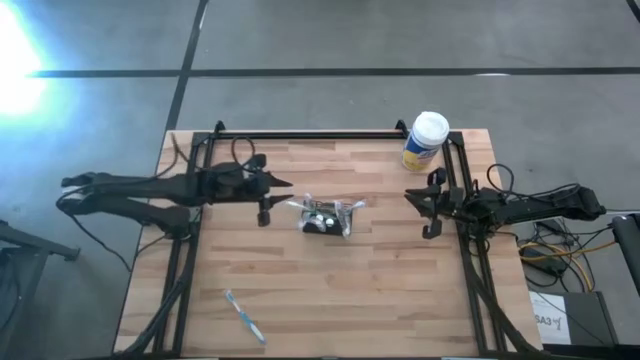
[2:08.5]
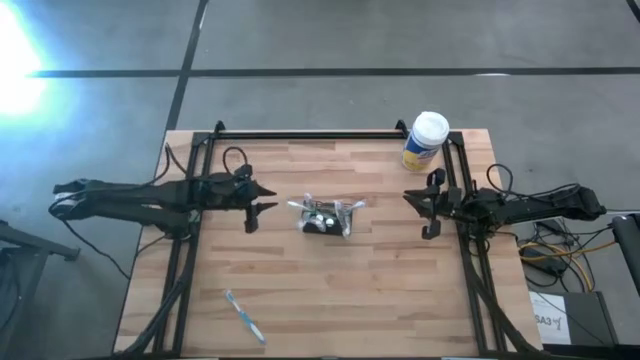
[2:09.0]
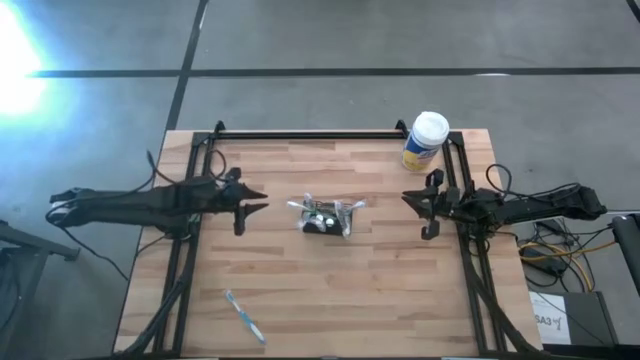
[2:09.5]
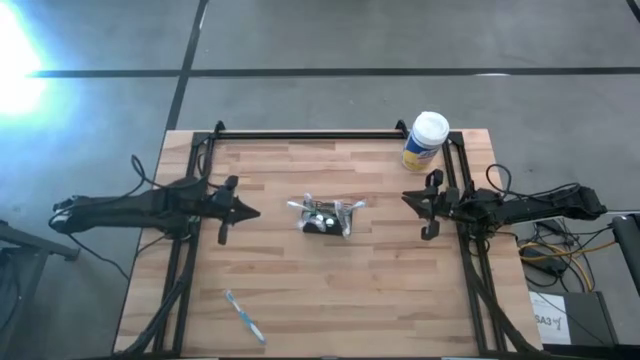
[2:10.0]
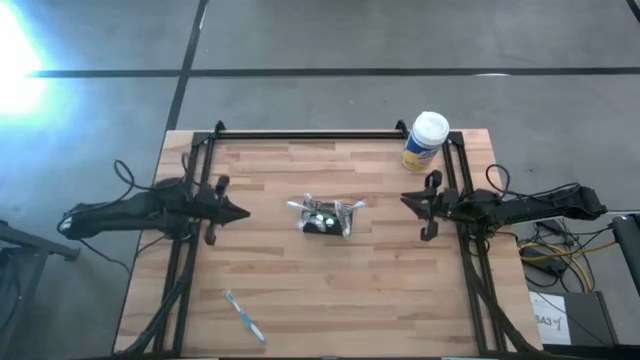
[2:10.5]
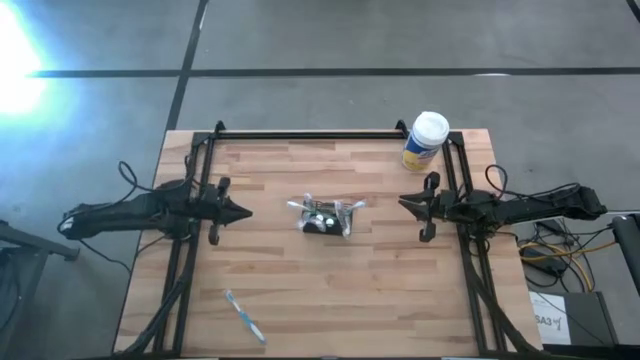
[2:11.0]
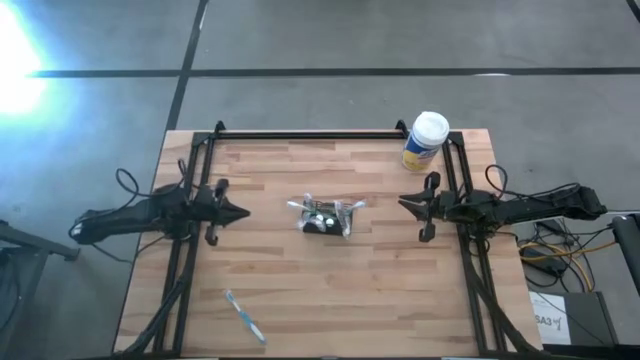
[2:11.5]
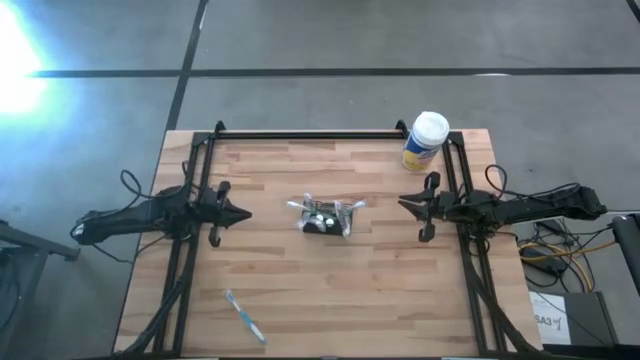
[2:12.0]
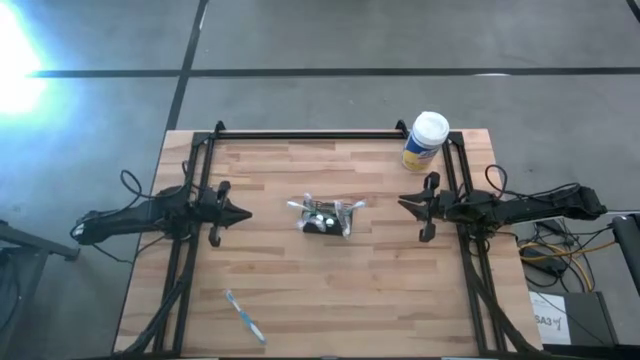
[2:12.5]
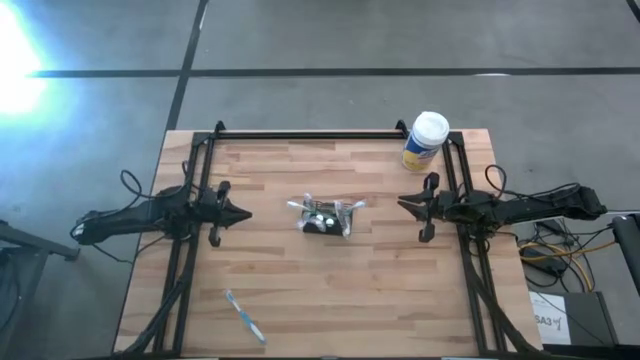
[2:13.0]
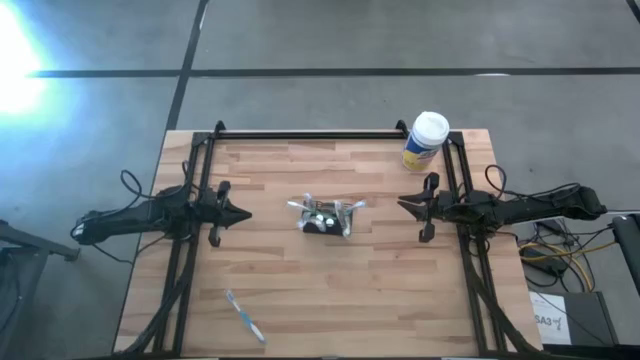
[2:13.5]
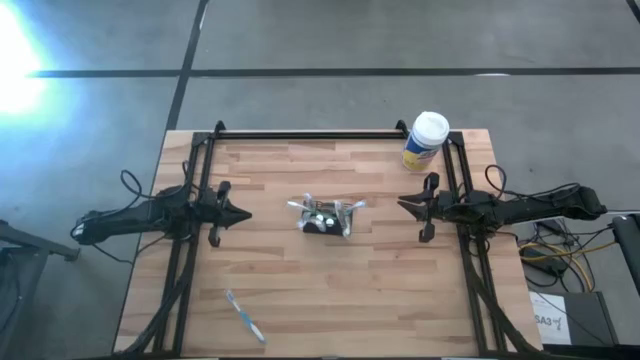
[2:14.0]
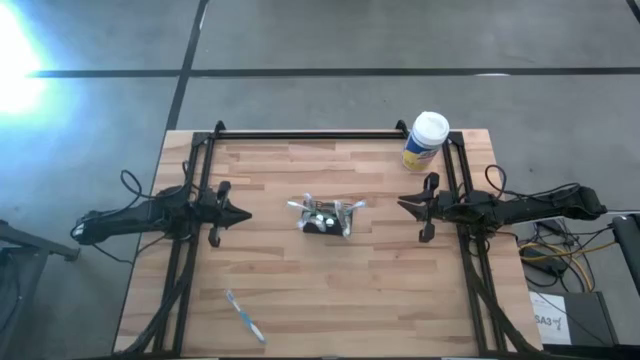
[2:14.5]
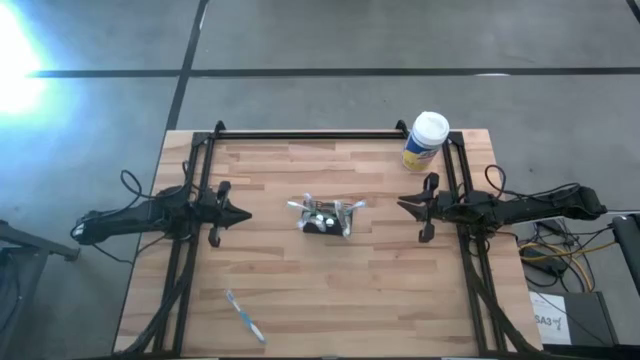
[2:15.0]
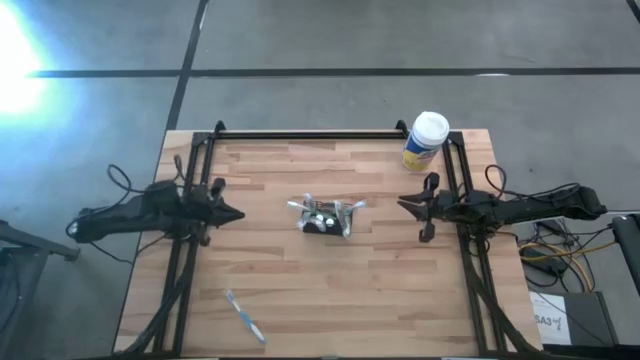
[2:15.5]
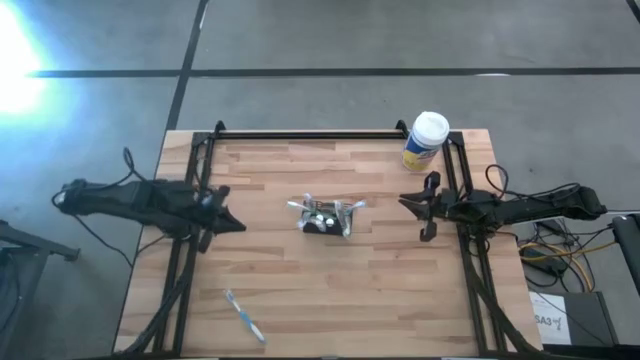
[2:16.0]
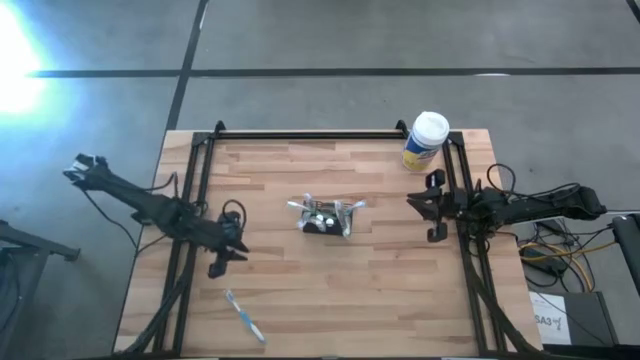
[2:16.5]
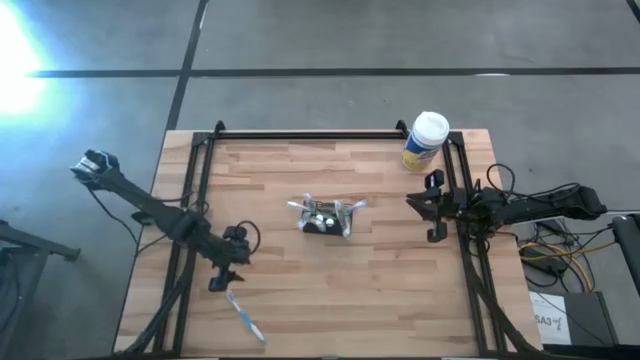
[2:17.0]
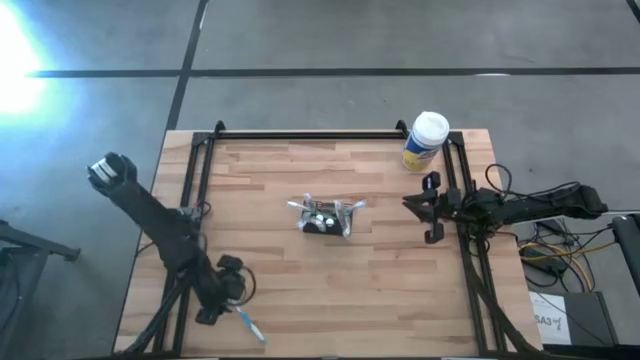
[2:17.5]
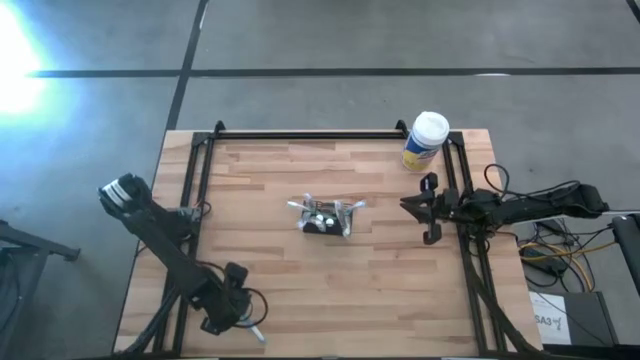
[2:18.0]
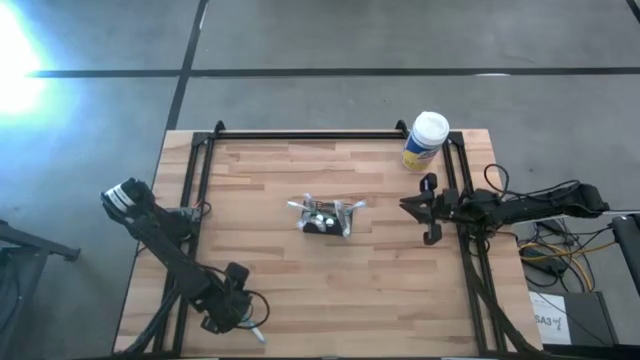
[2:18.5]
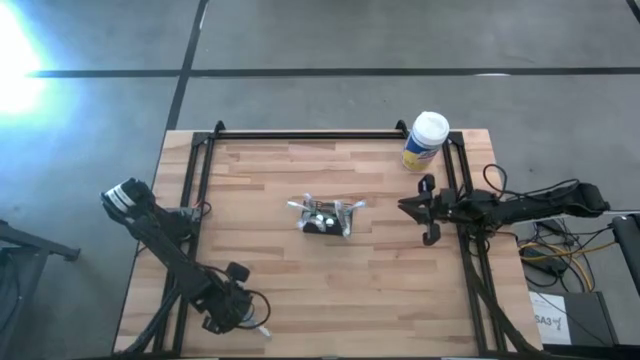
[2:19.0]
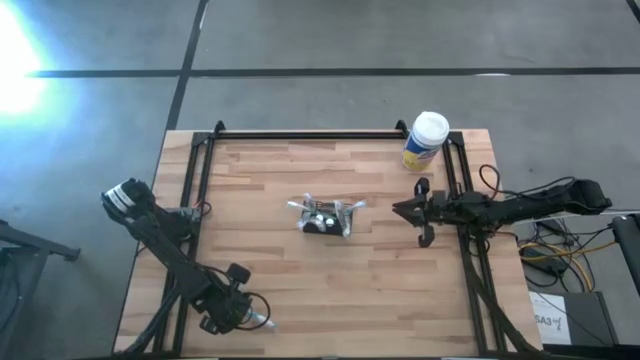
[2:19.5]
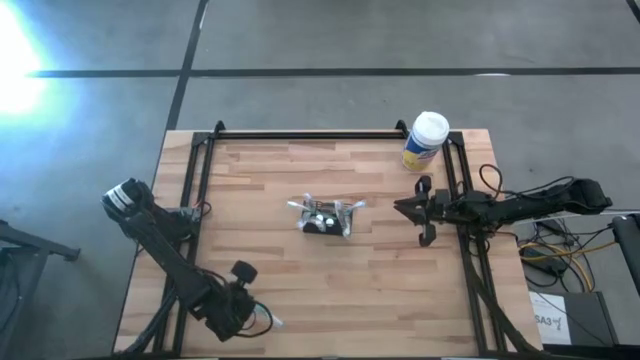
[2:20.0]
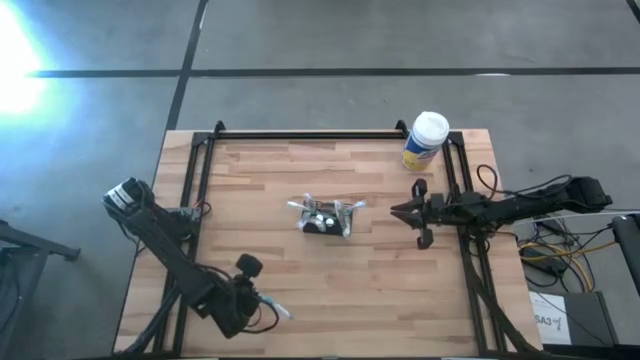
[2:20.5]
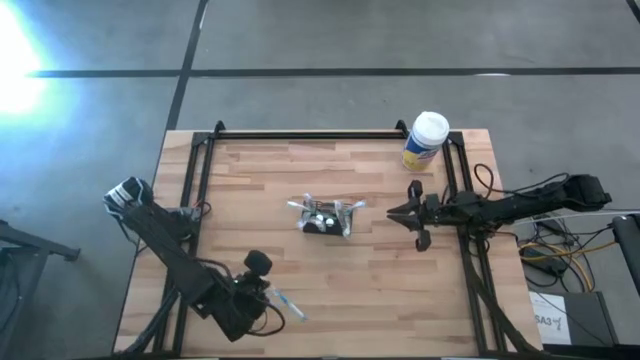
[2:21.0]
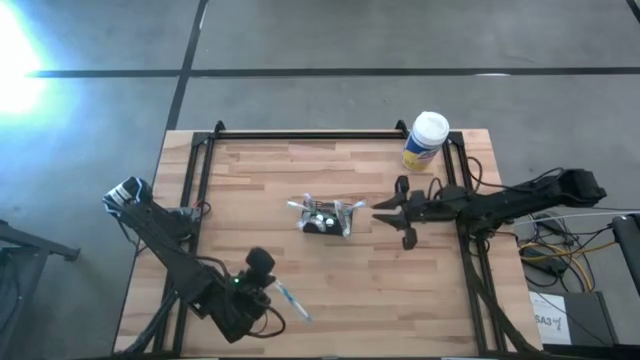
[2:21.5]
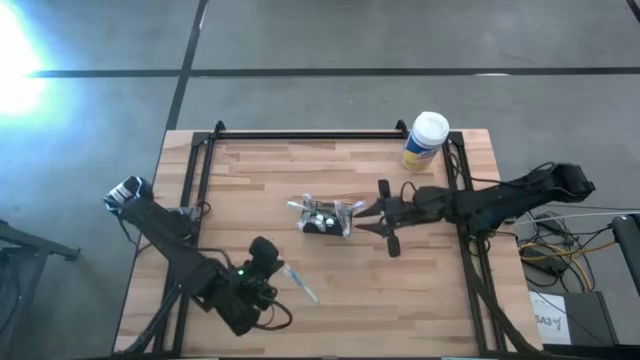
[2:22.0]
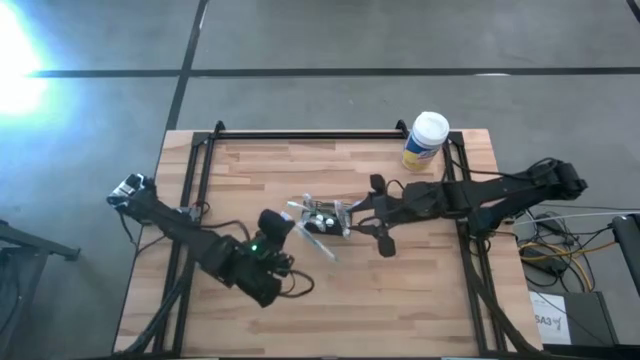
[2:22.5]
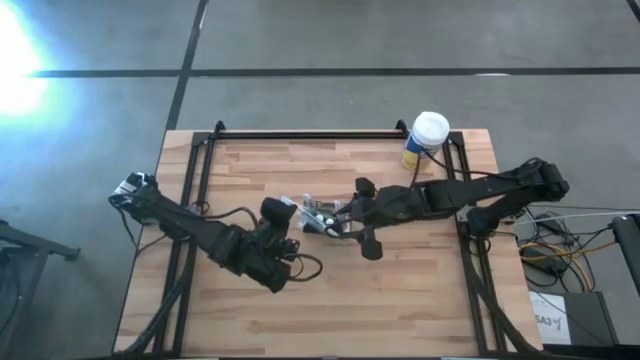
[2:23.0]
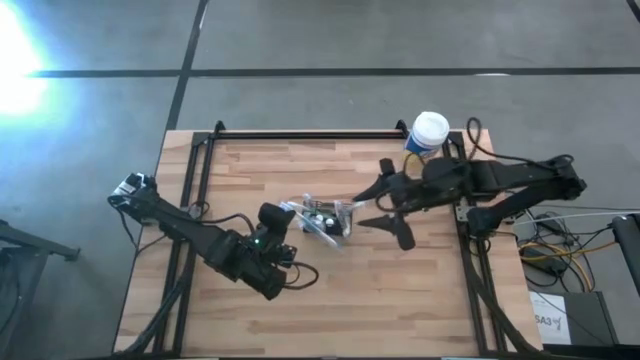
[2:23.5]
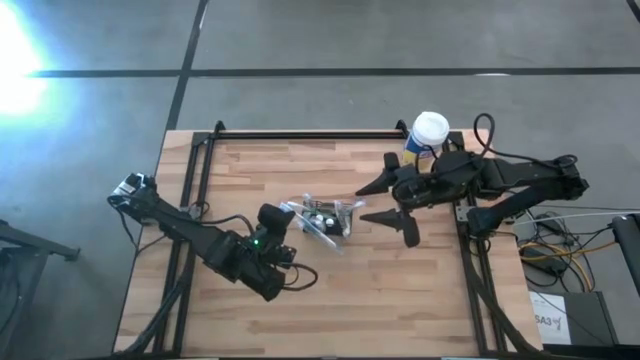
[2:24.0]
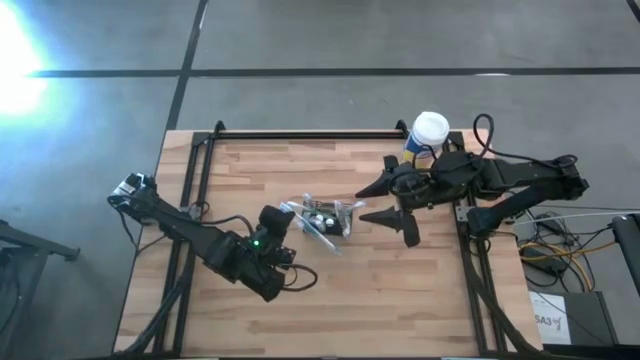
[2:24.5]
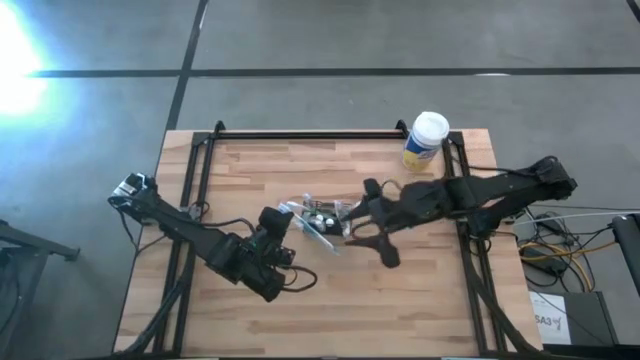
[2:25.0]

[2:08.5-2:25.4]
Task: Pick & Place toothbrushing station
Put the blue toothbrush into the black mesh organizer

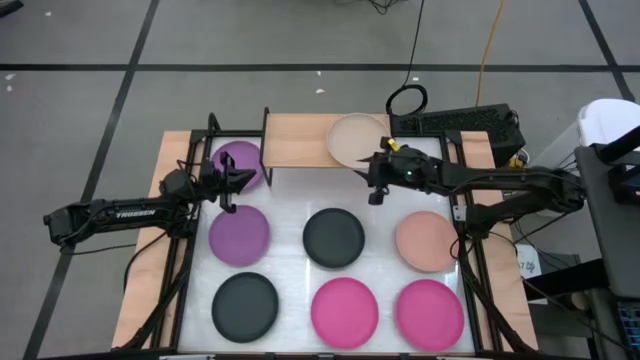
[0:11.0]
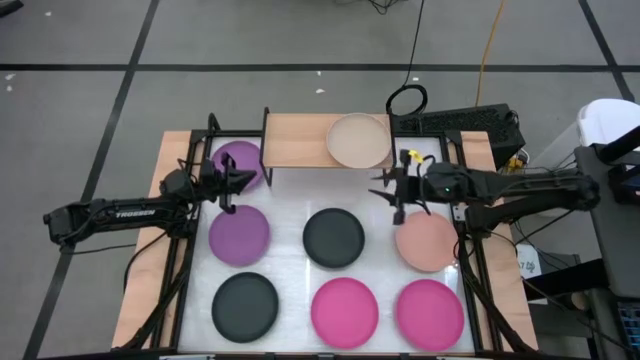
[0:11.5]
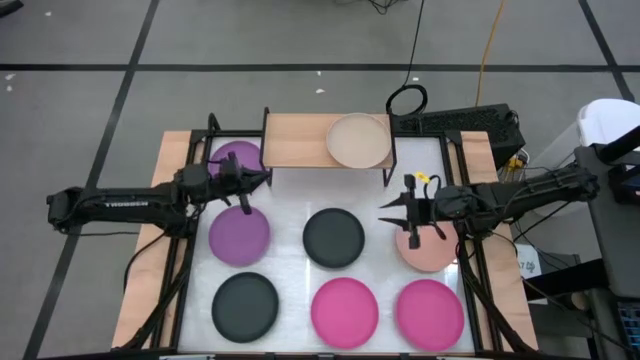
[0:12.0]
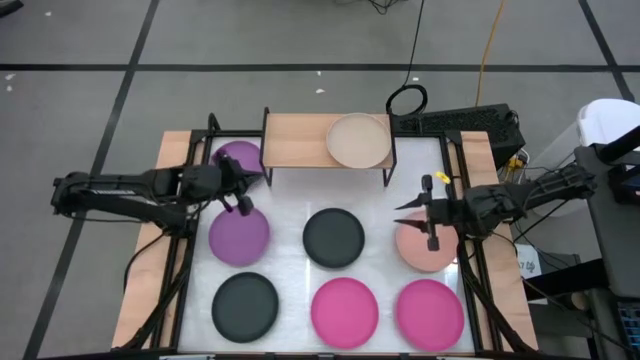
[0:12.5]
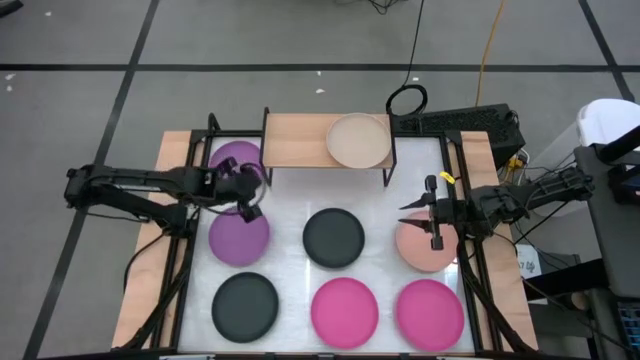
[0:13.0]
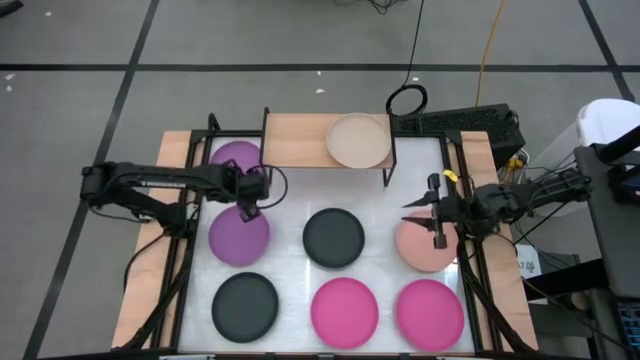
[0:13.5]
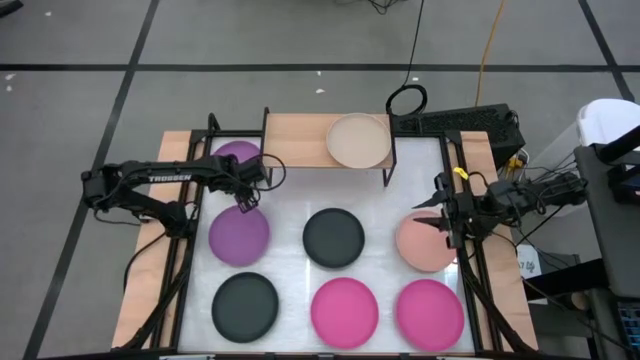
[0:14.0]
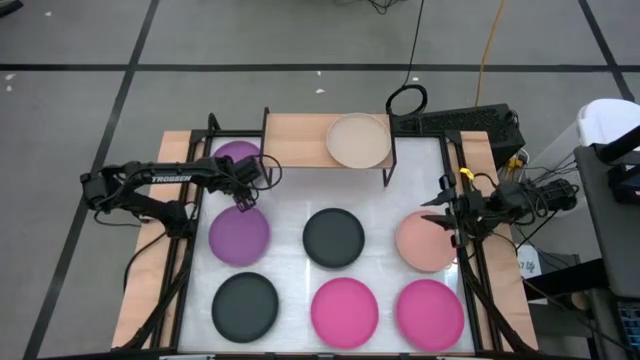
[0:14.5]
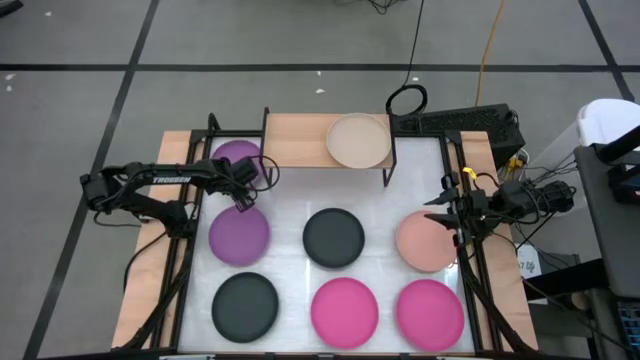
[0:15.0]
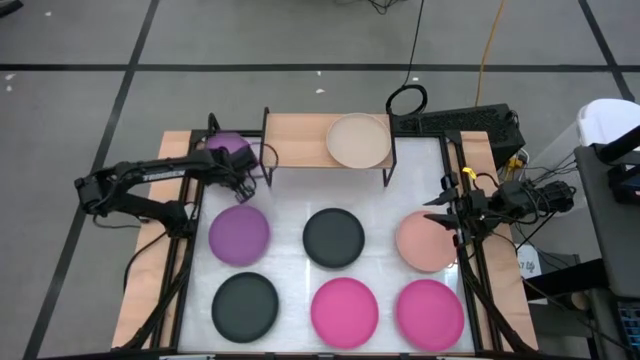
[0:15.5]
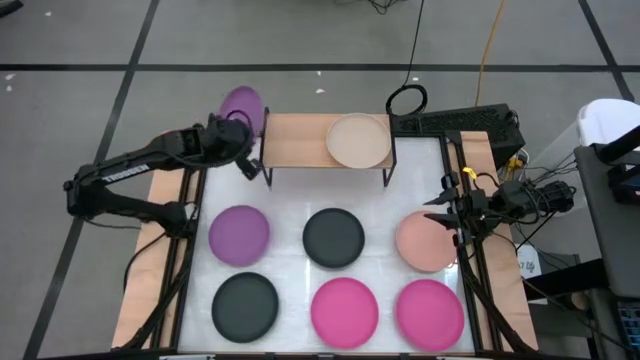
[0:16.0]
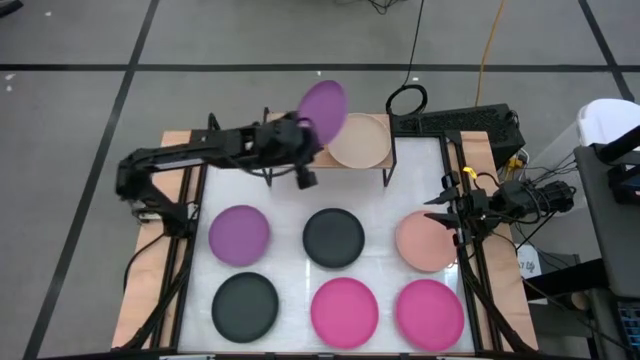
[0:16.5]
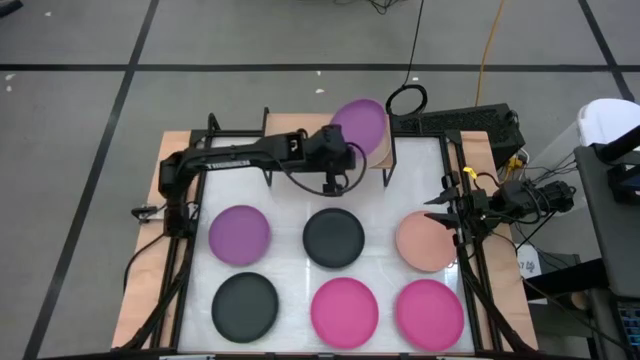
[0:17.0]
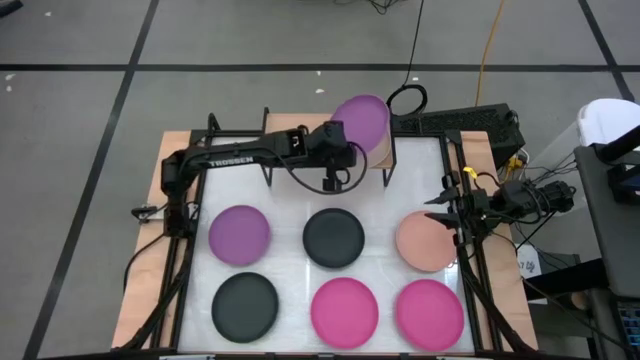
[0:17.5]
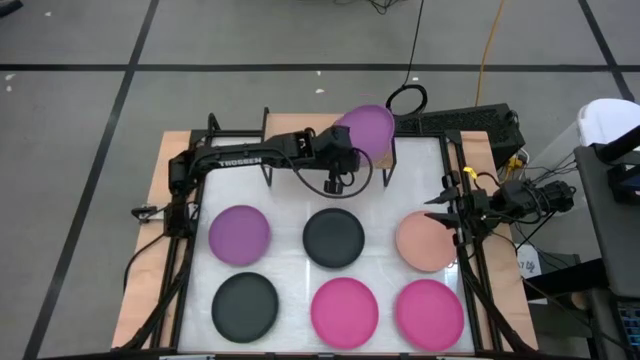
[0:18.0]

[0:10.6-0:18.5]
Task: Place and stack plates onto a shelf
Stack the top purple plate on top of the brown plate on the shelf
